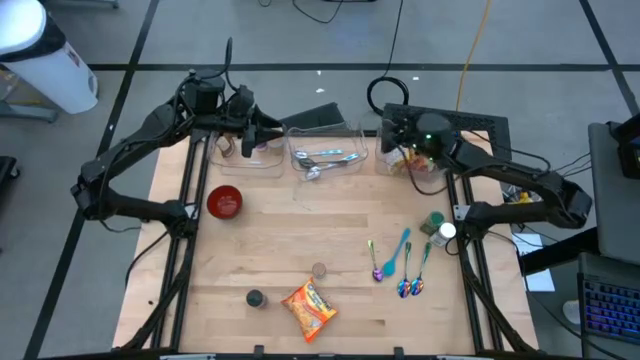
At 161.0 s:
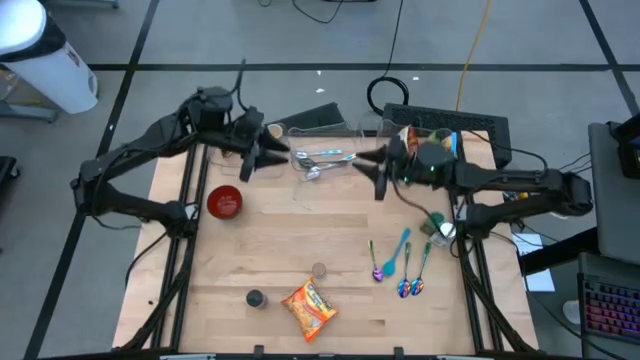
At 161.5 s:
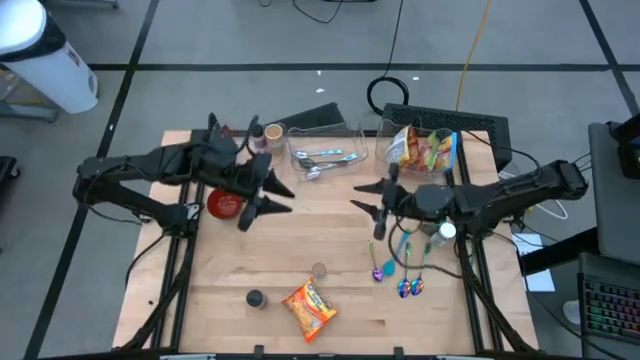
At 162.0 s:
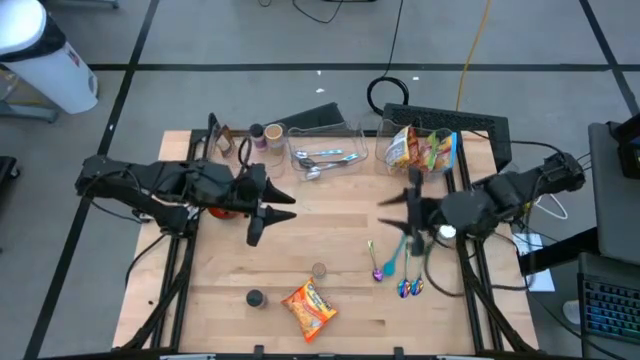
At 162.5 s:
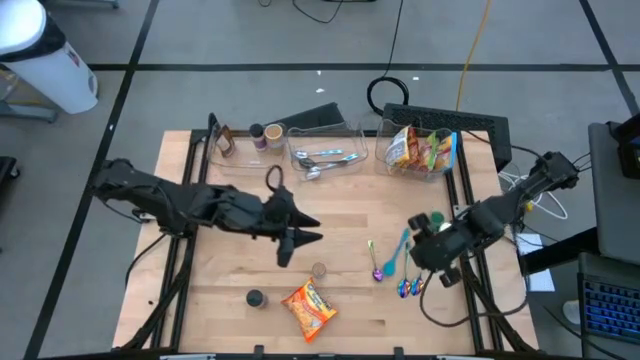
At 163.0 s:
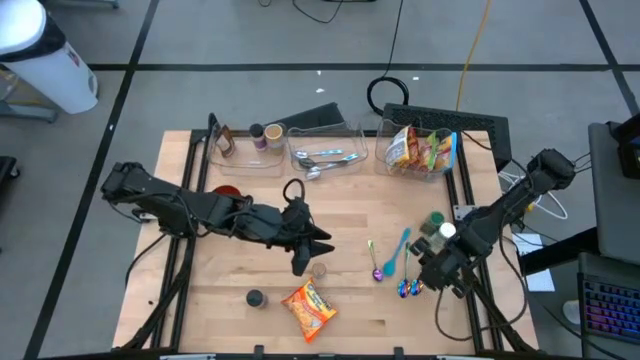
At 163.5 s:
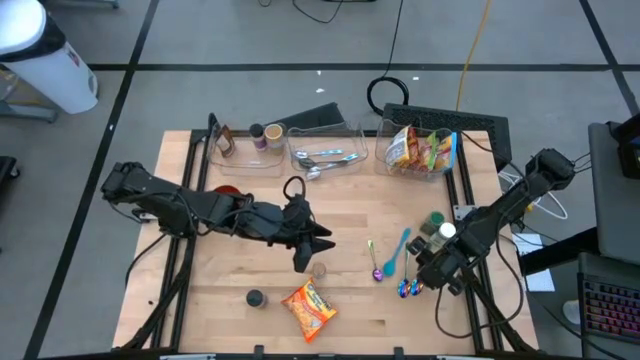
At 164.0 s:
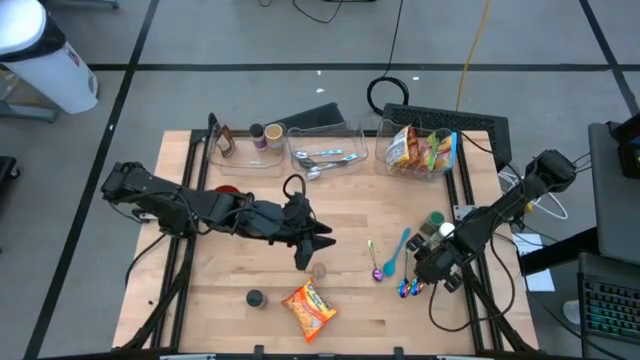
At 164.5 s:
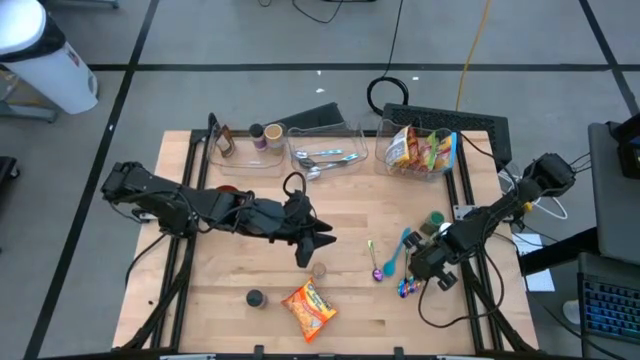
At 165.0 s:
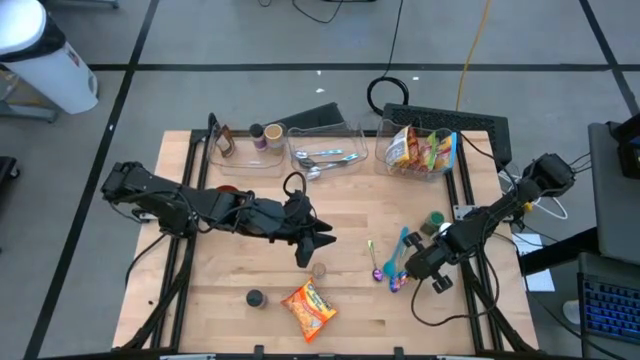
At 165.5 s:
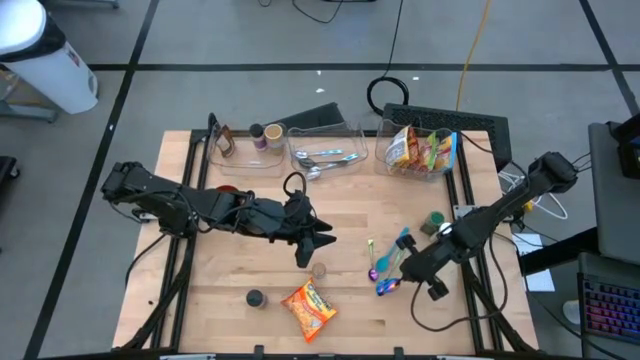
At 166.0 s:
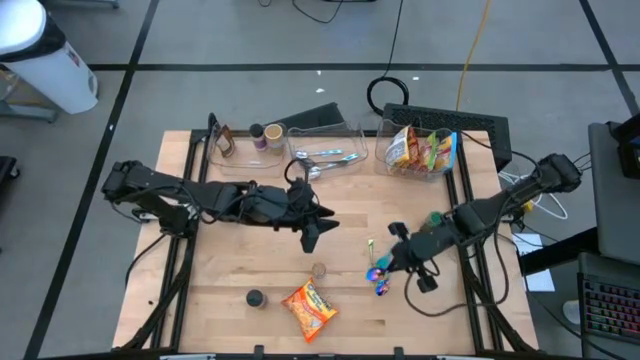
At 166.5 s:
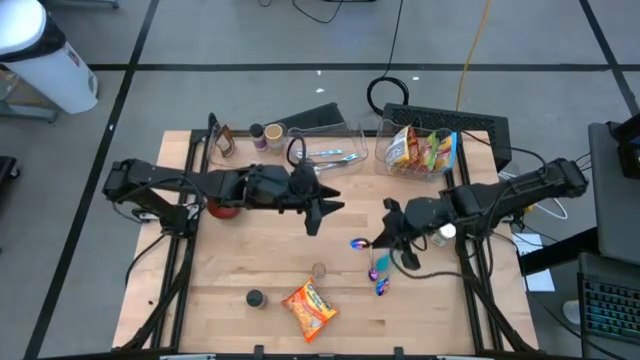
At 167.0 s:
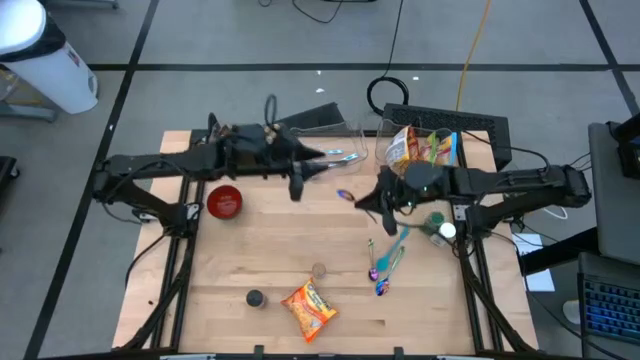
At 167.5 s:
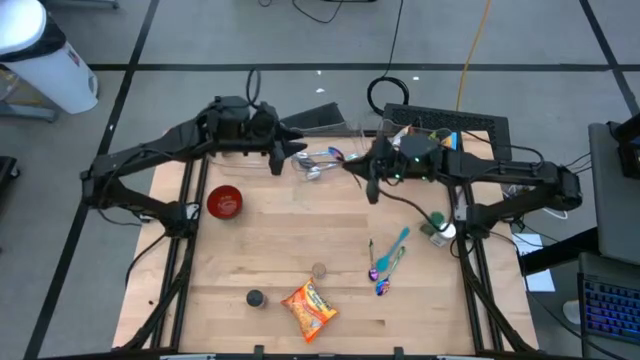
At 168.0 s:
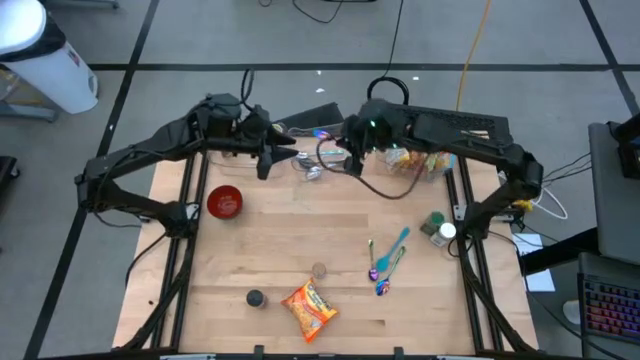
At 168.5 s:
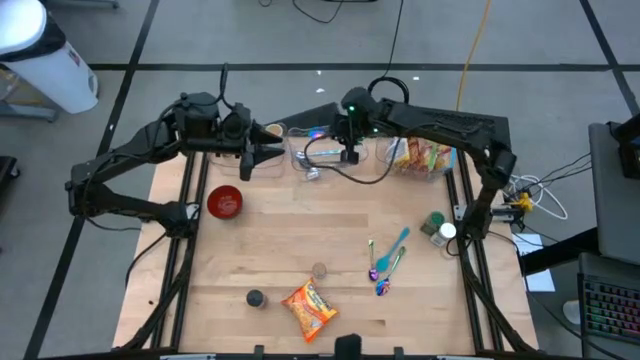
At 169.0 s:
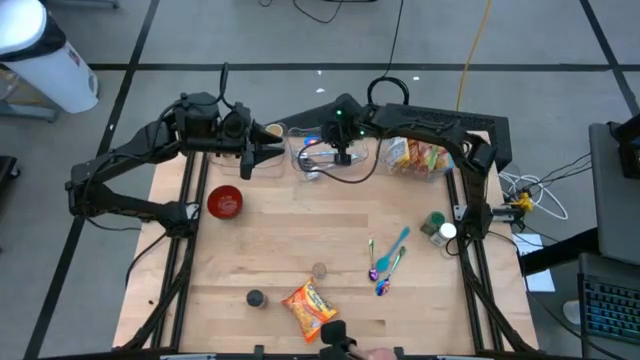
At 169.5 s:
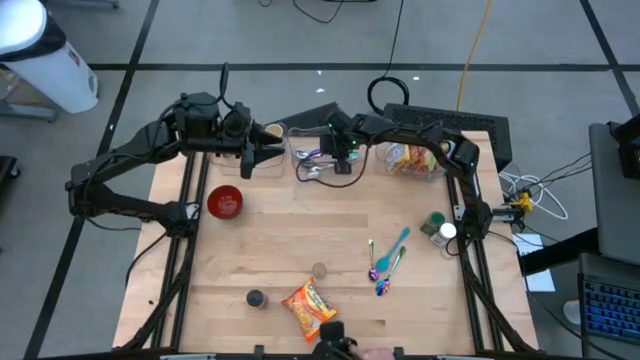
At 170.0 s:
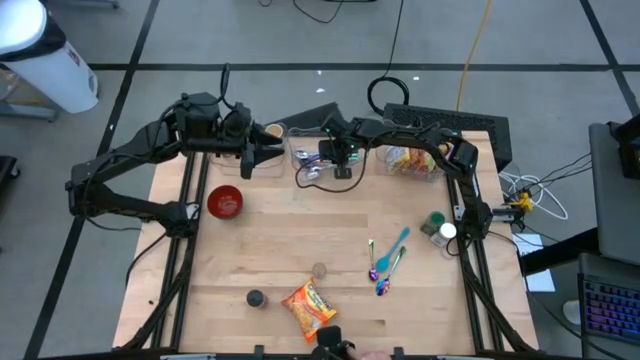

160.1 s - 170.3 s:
Task: Pick & Place Food Item
Put the right blue spoon into the middle transparent bin

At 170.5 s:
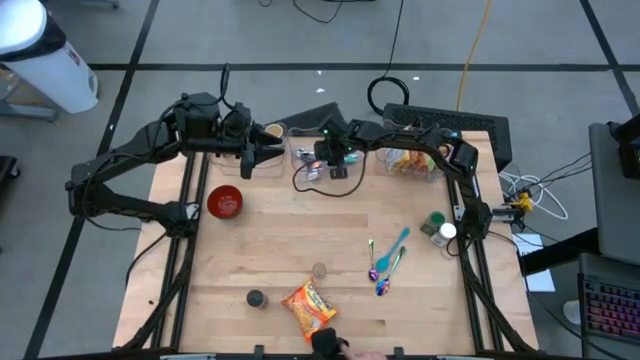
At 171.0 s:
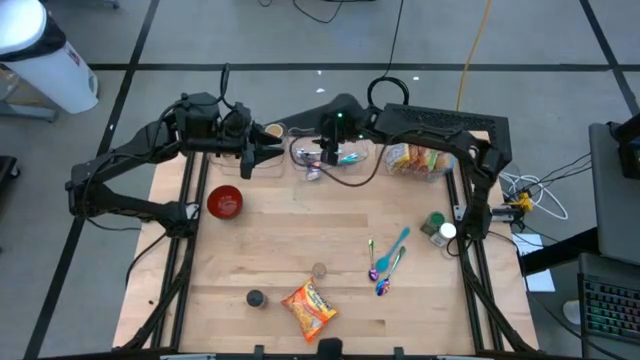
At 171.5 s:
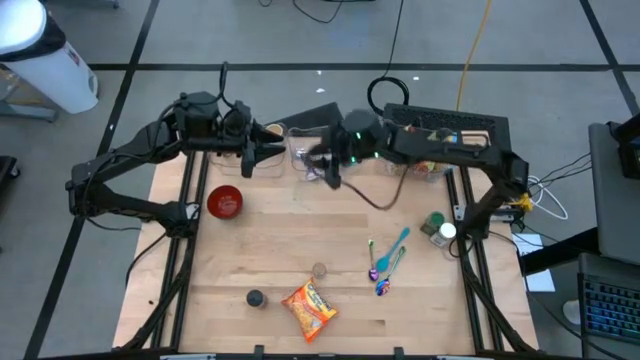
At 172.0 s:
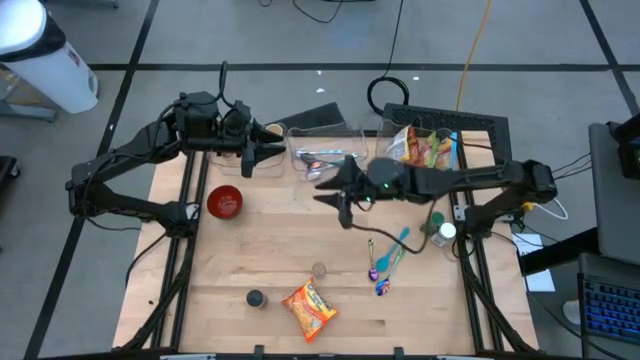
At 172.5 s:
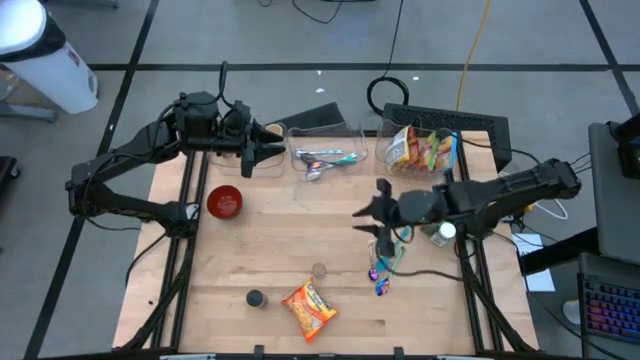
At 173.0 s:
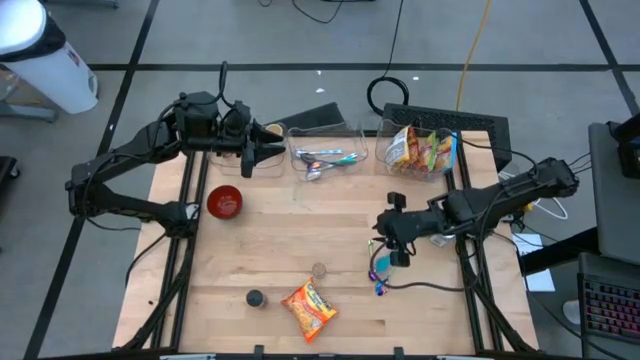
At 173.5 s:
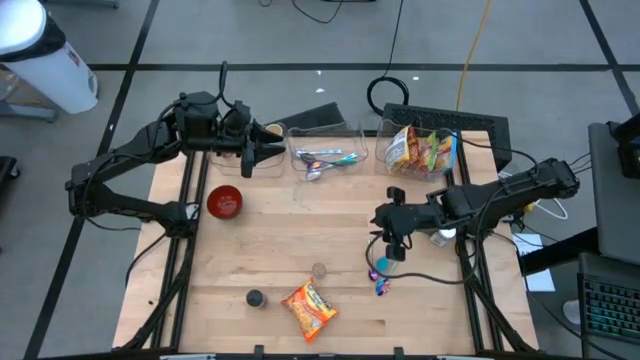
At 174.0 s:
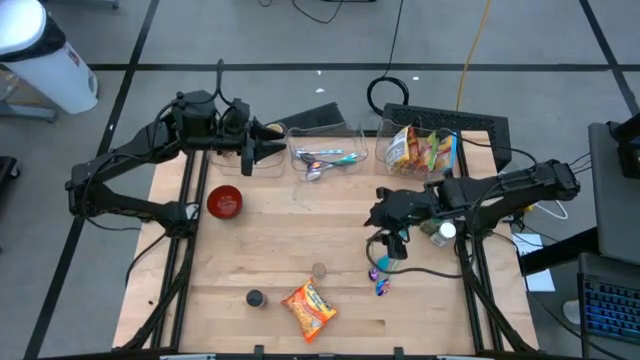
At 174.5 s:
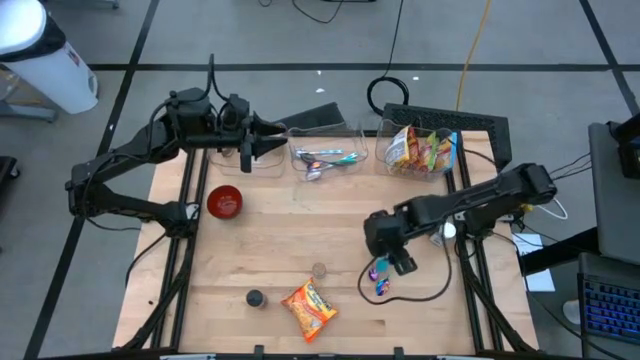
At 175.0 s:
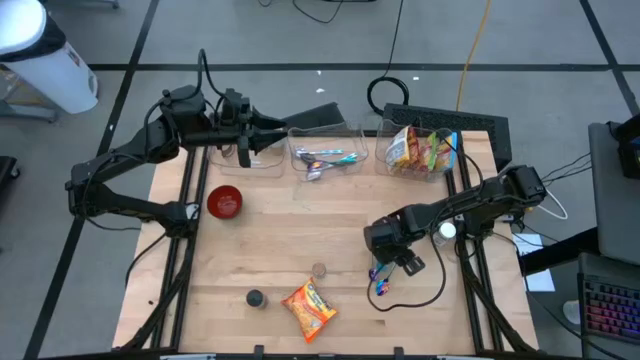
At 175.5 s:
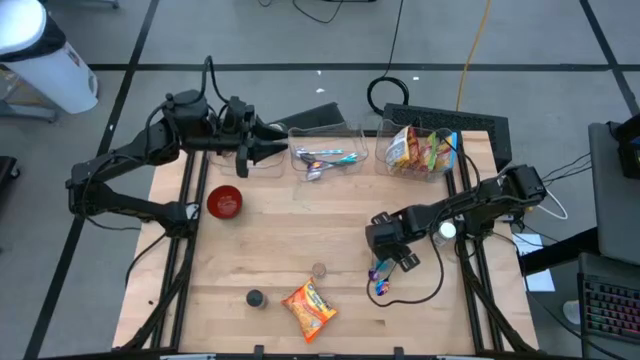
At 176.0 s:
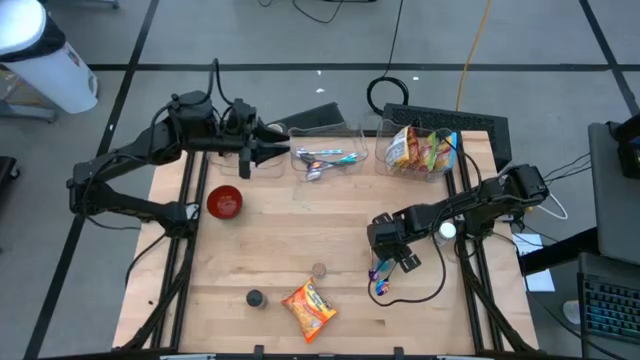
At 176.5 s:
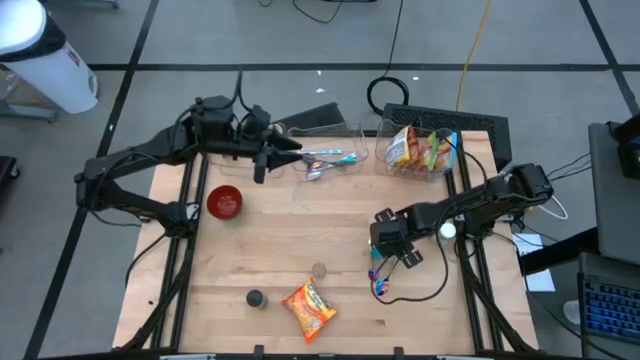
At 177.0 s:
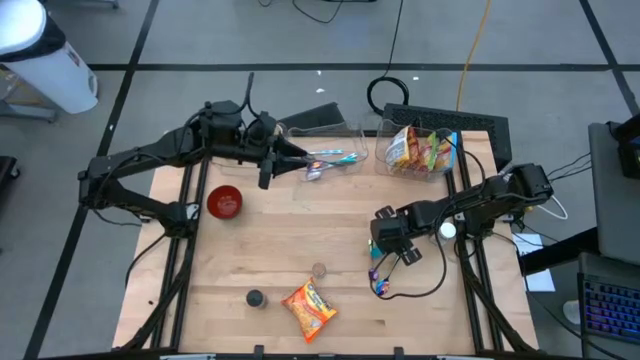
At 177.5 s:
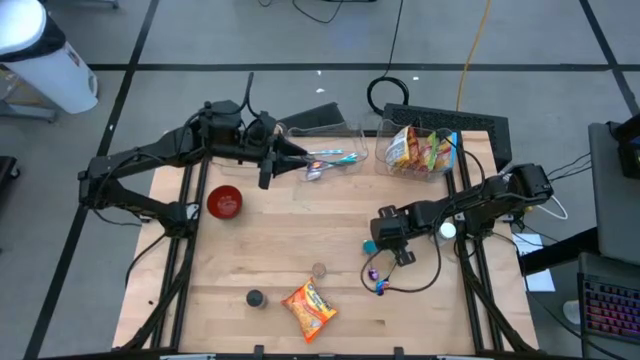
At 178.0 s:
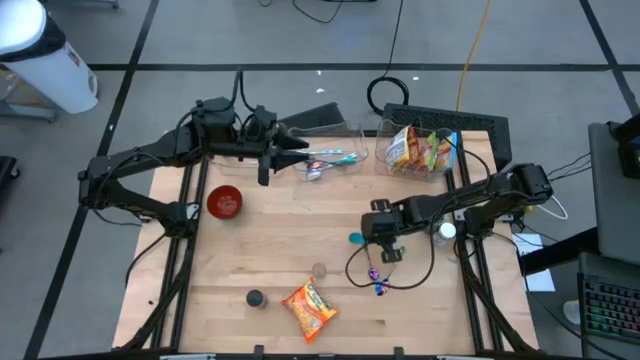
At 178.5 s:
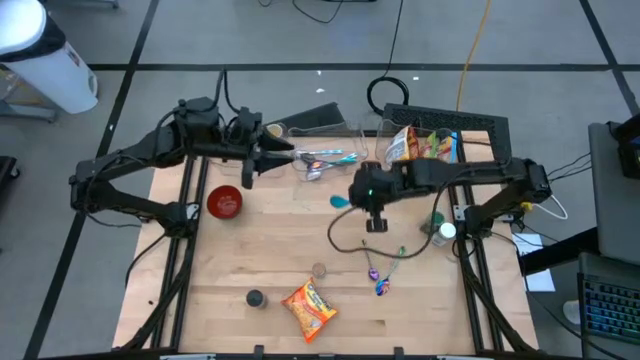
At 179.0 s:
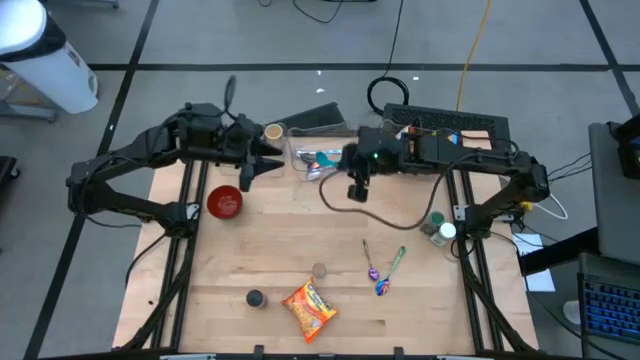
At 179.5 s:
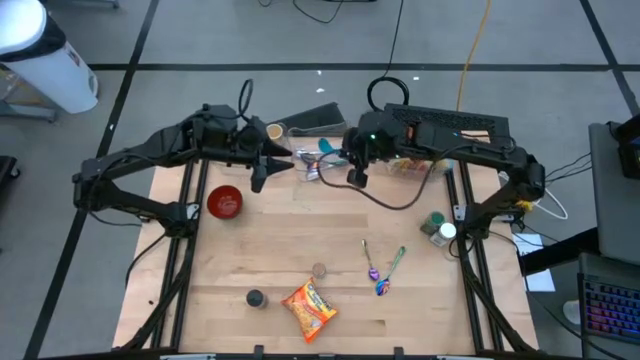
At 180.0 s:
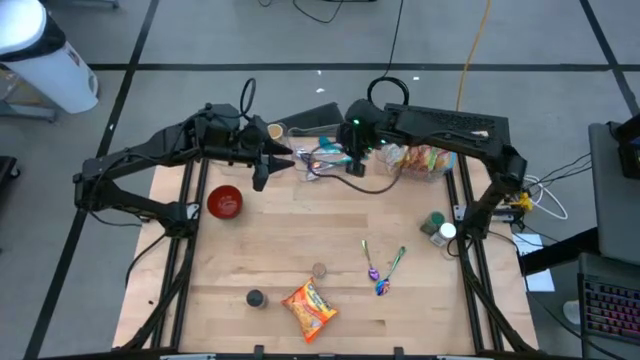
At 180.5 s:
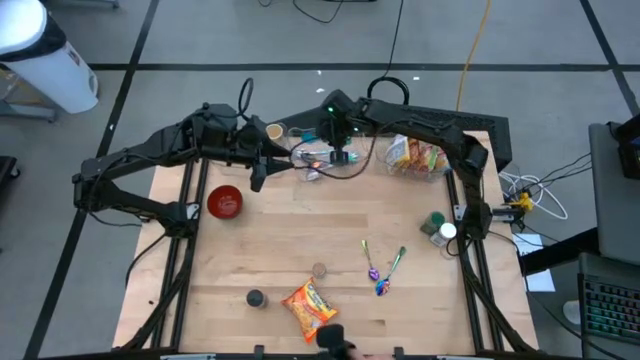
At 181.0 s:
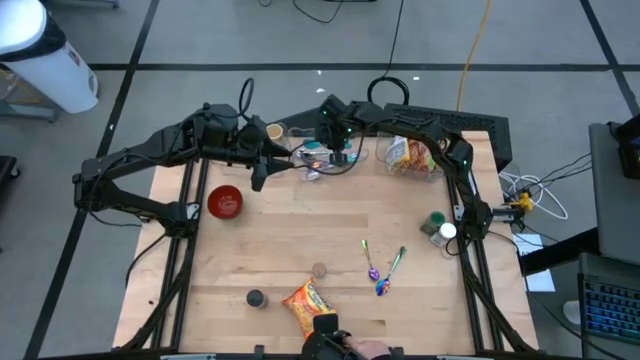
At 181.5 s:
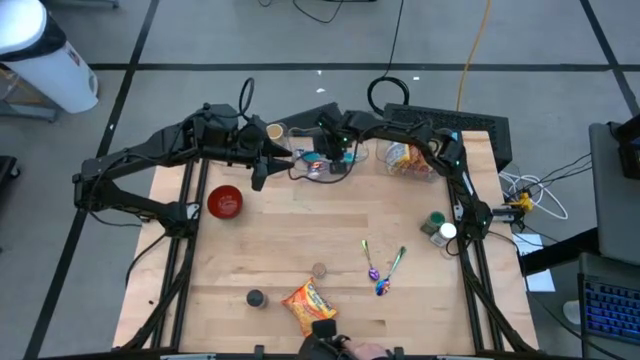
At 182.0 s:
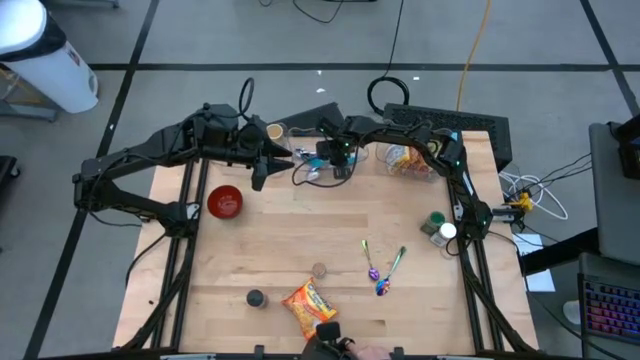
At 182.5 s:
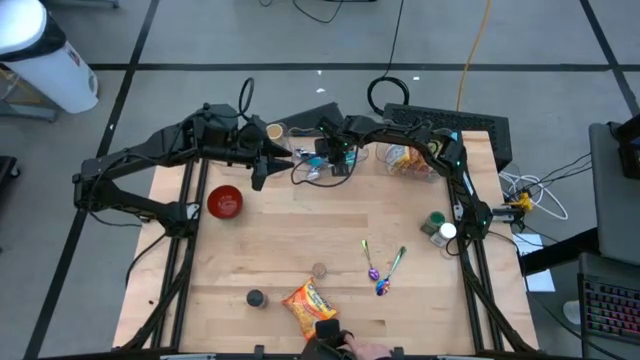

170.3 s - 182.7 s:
Put the blue baby spoon into the middle transparent bin
